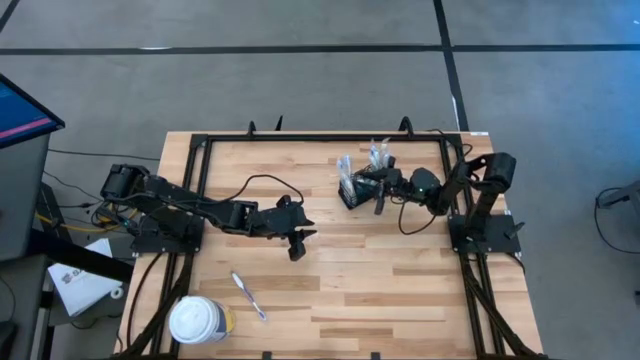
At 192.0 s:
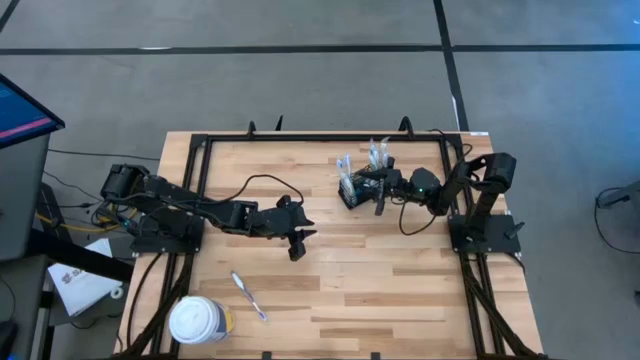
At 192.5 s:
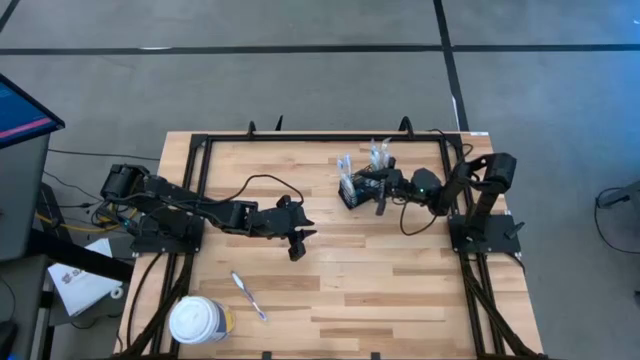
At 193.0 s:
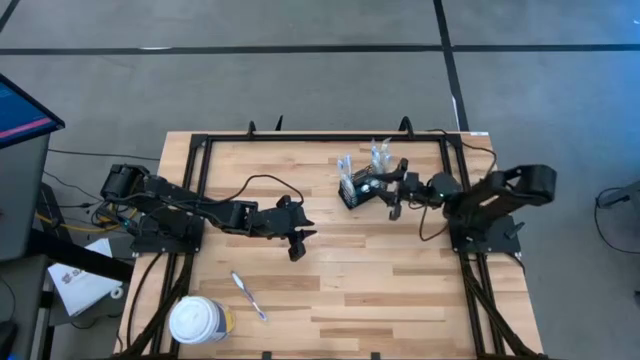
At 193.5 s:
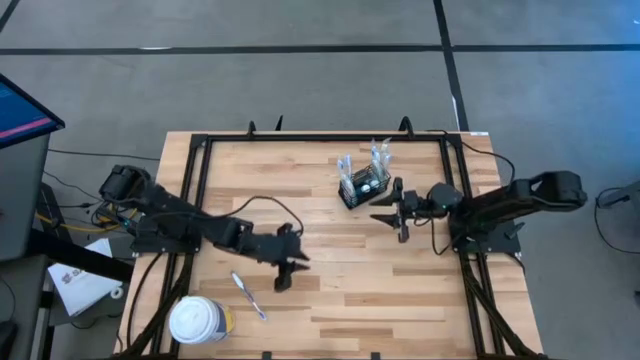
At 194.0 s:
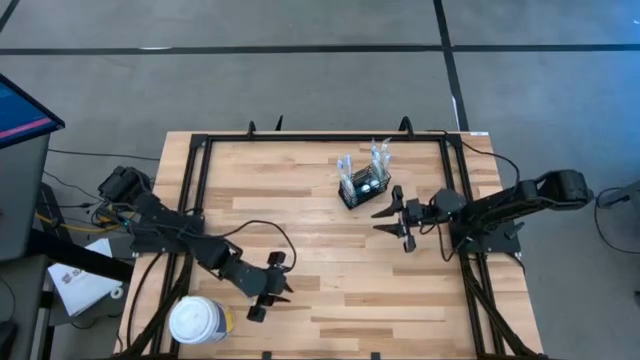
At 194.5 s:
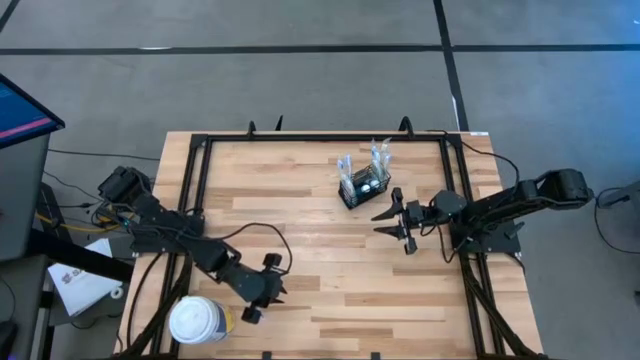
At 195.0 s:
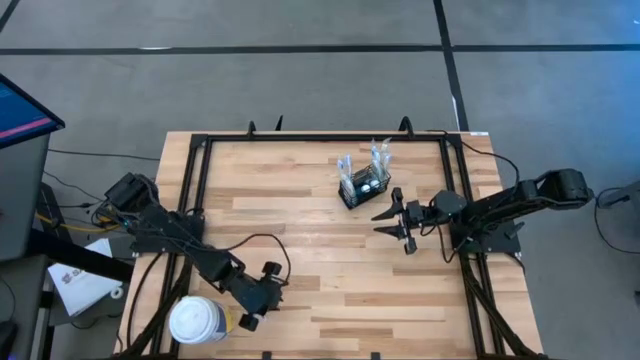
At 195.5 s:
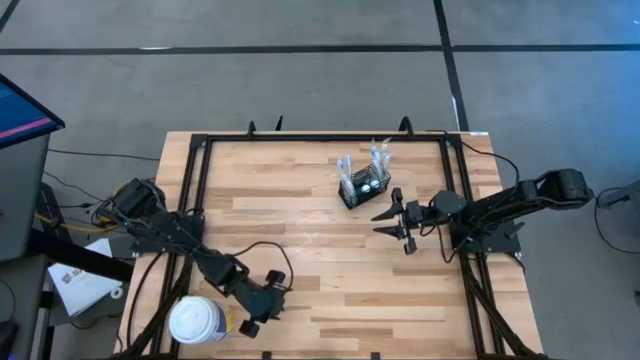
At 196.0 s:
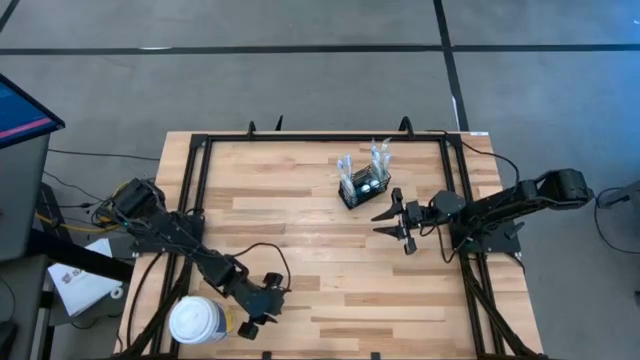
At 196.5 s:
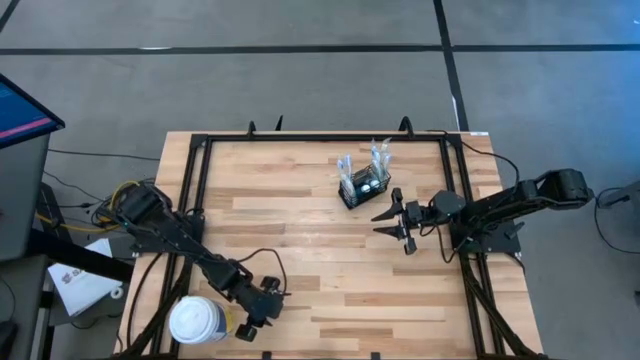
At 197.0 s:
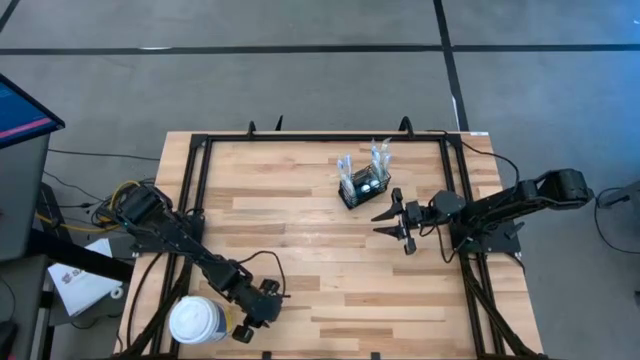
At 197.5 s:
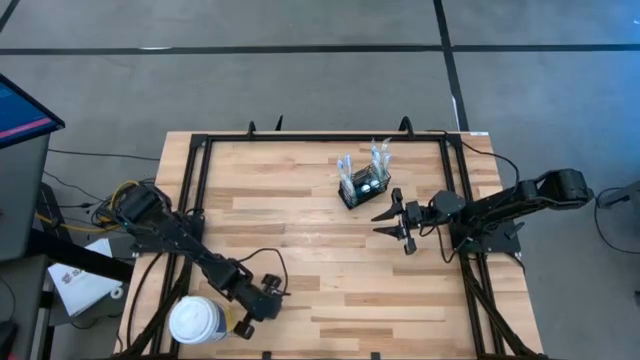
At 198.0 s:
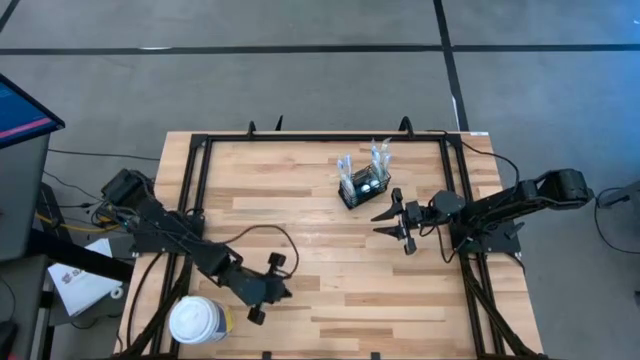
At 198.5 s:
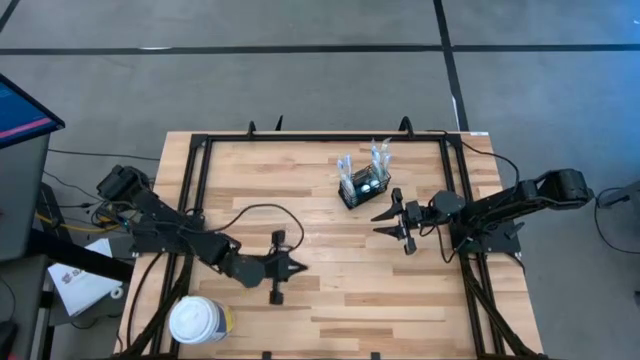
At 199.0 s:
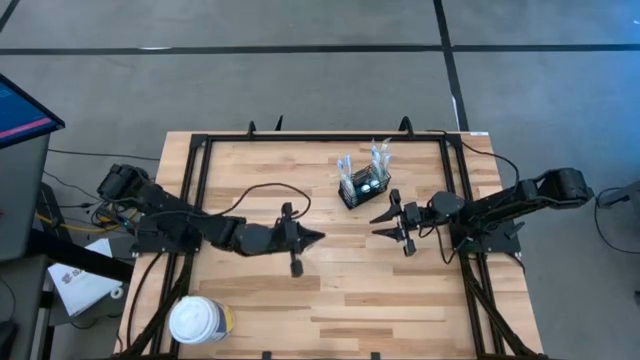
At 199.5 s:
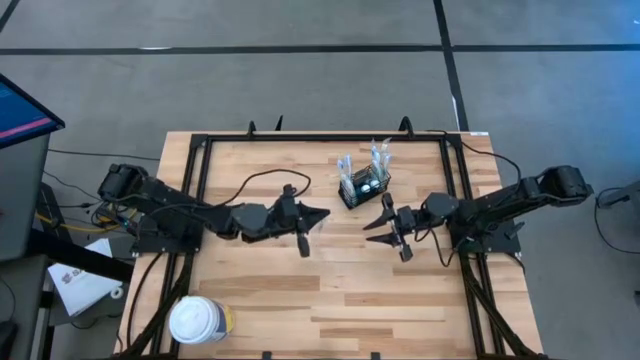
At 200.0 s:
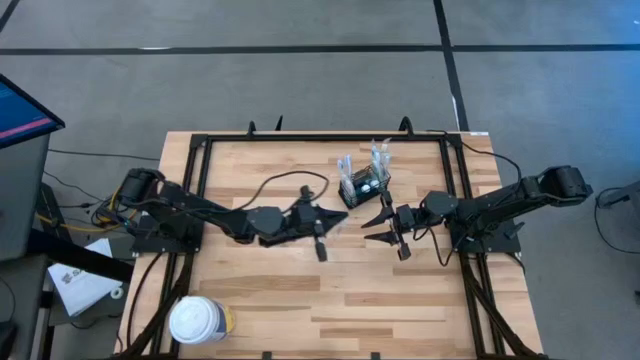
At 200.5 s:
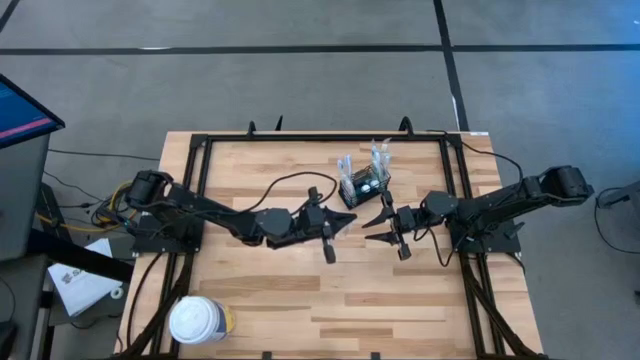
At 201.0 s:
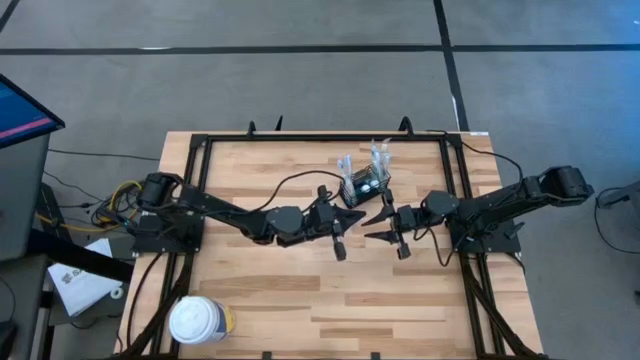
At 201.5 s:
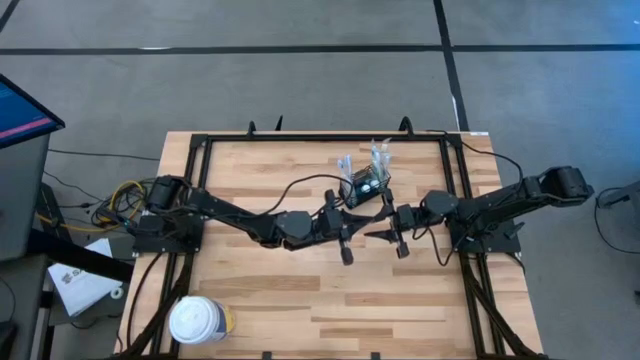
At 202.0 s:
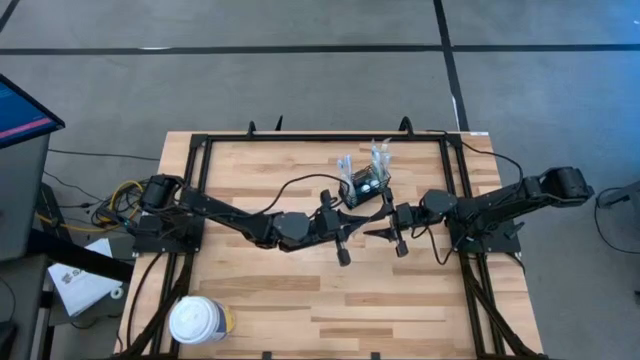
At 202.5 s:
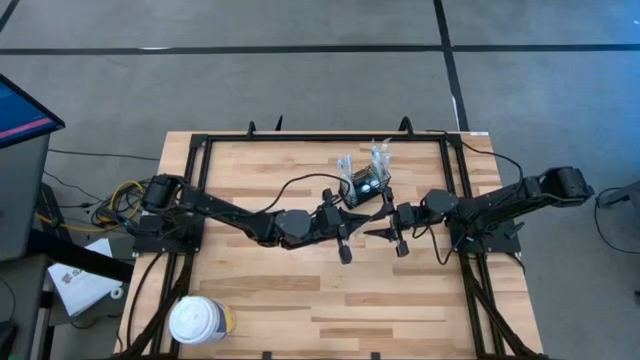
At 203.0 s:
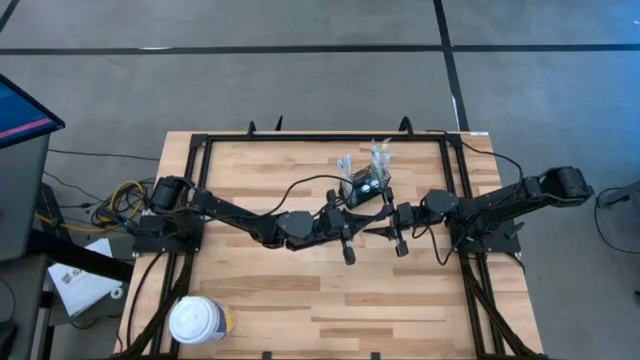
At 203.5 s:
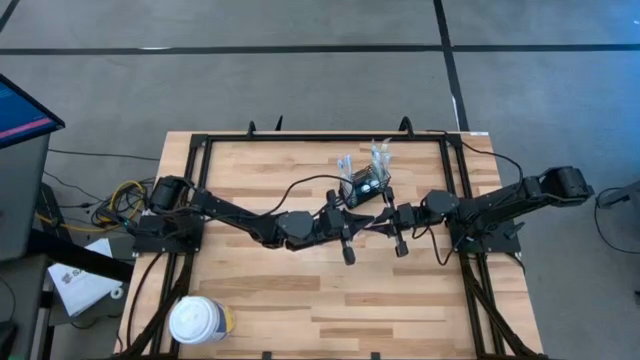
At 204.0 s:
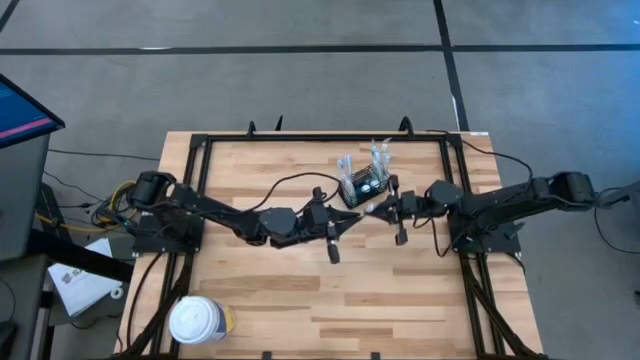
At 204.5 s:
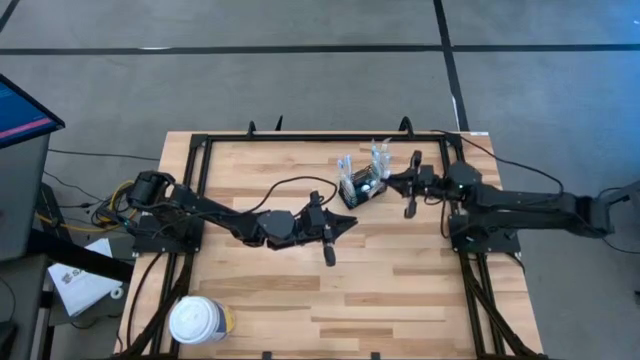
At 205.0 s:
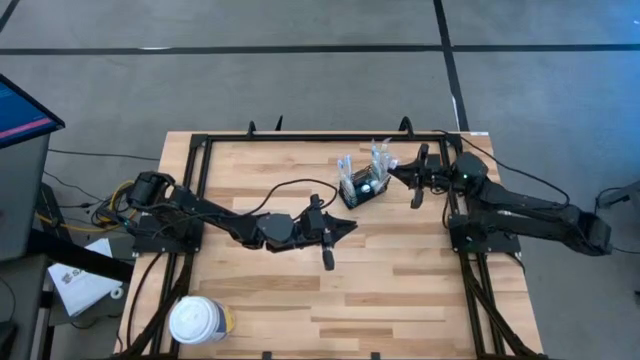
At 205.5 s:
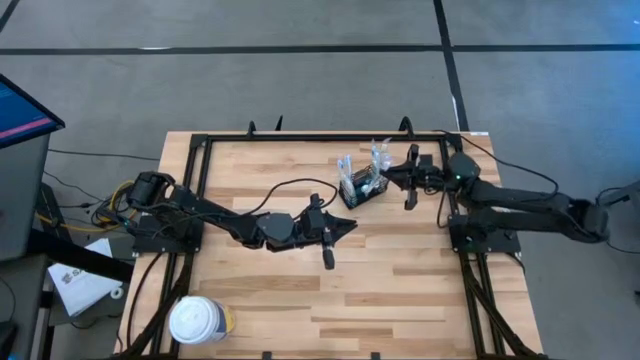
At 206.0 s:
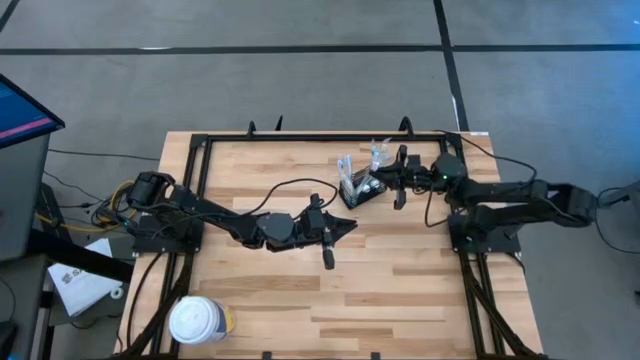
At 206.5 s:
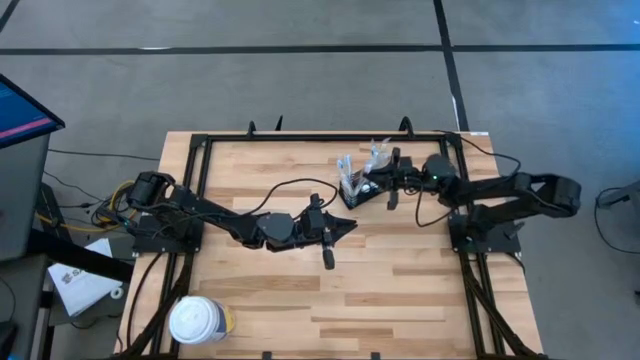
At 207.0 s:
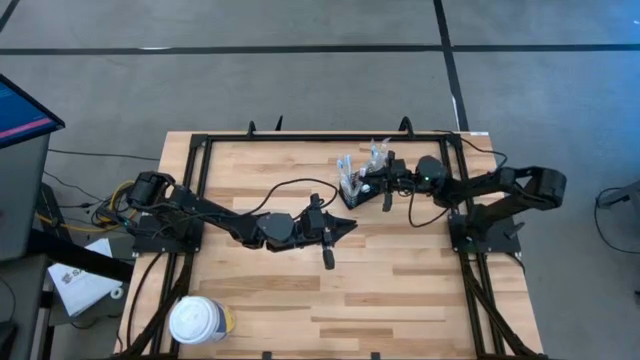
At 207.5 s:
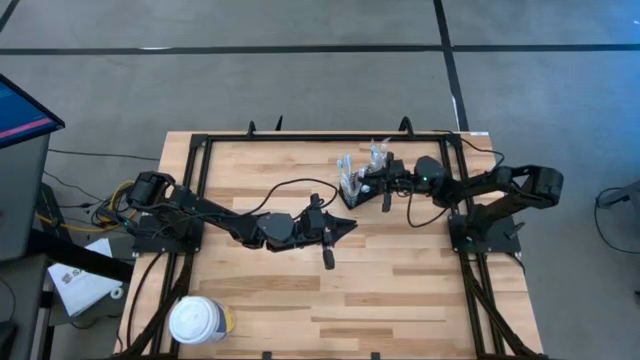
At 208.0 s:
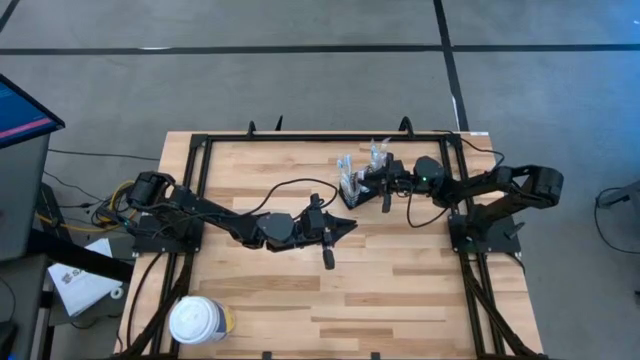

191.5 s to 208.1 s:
Task: Pick & Place toothbrushing station
Put the purple toothbrush into the mesh organizer

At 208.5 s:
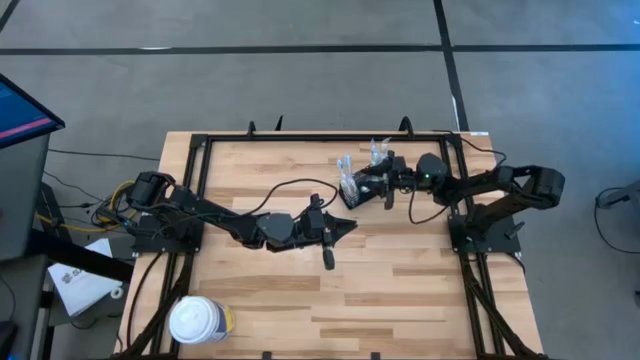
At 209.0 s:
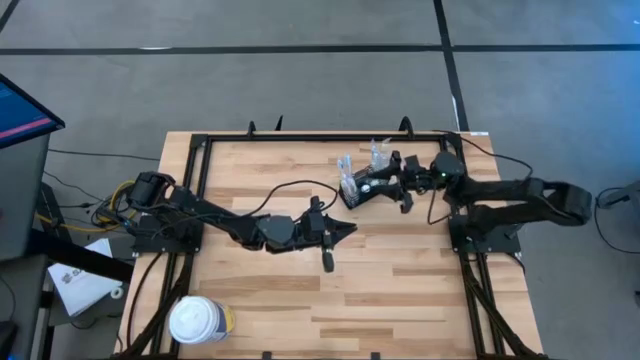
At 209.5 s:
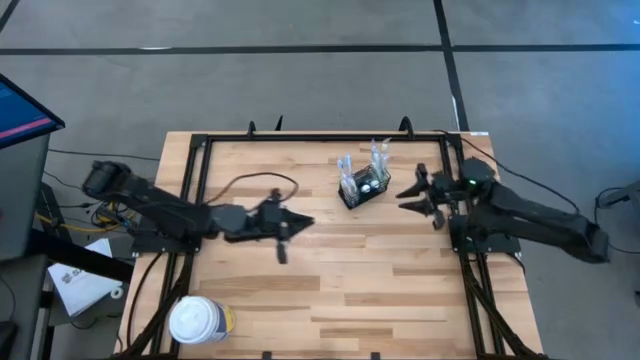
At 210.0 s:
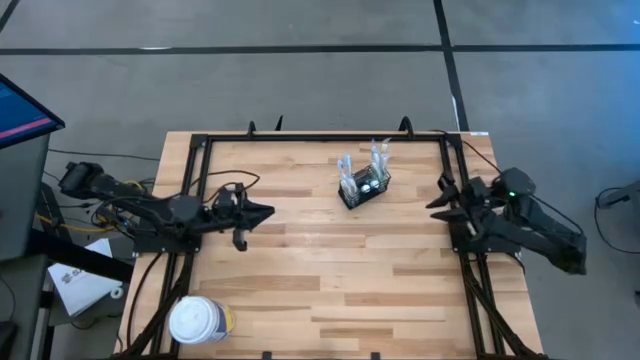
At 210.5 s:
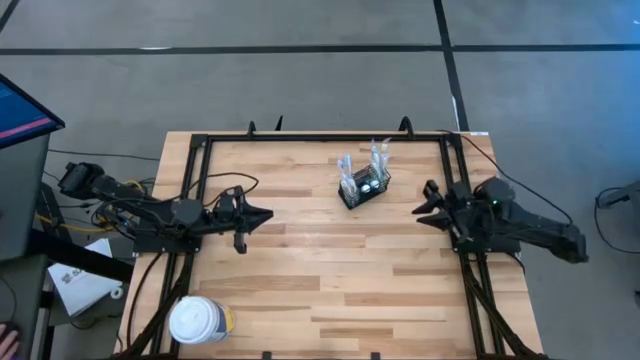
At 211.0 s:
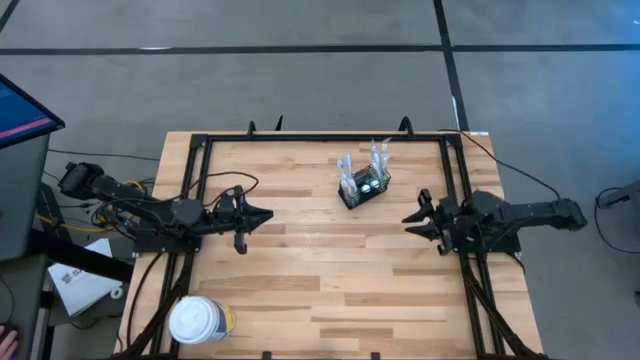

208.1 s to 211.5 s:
Return to Home Position

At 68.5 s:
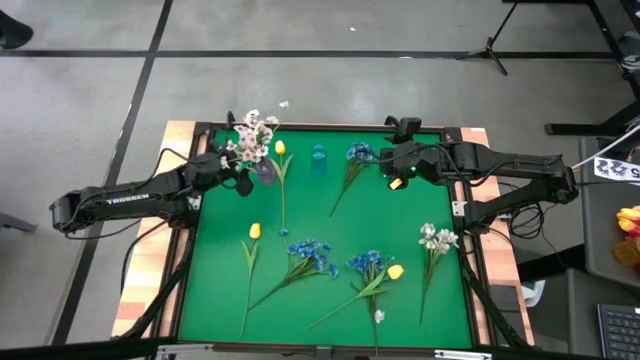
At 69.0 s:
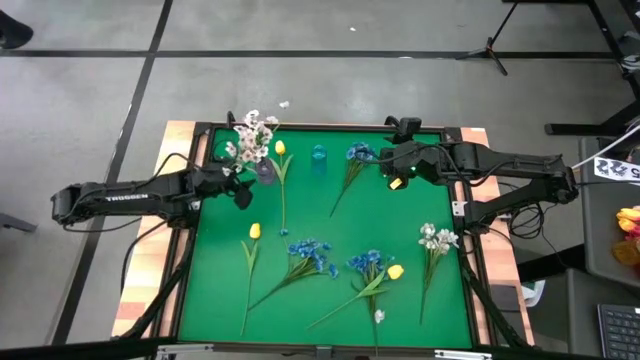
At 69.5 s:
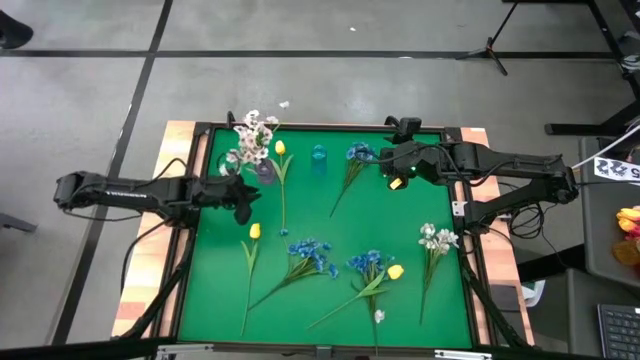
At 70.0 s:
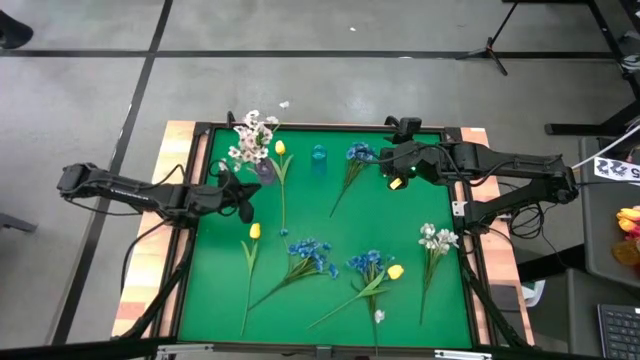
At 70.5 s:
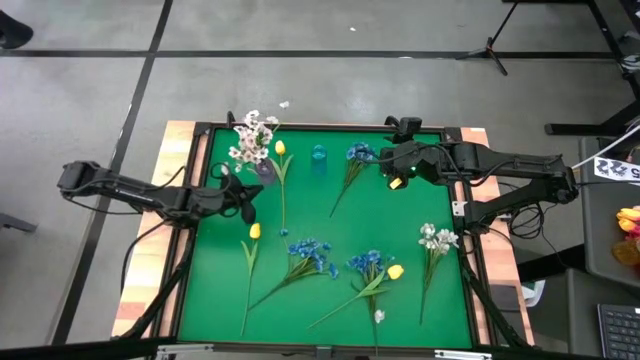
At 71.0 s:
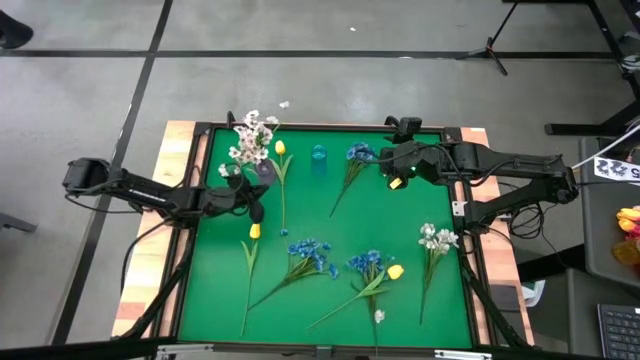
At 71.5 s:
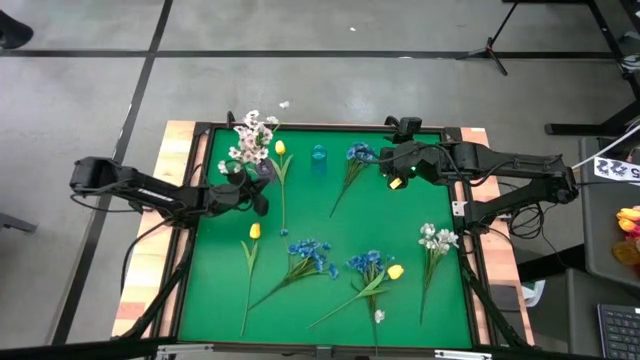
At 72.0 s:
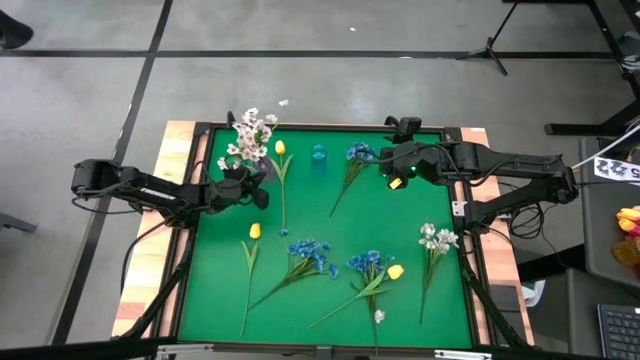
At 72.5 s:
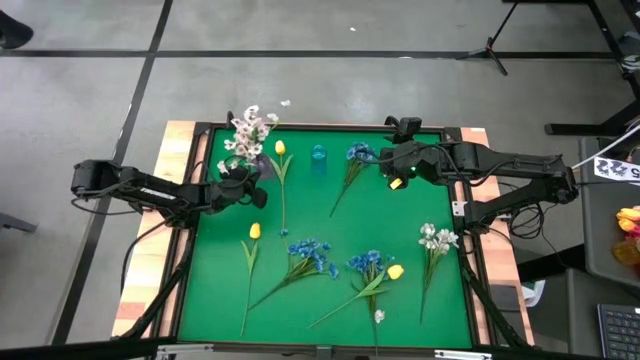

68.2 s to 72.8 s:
Task: Sort flowers into vase by color
Adjust the violet vases
